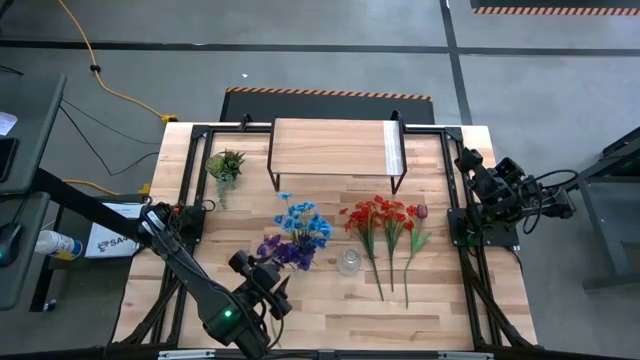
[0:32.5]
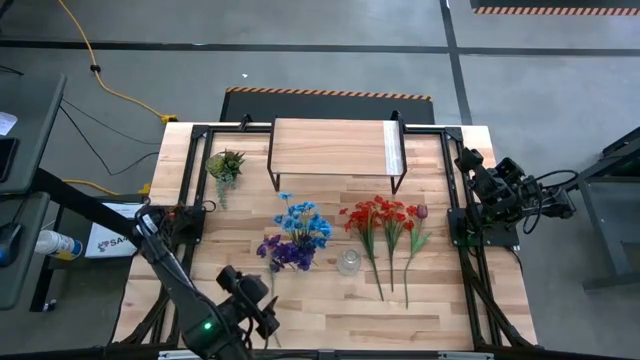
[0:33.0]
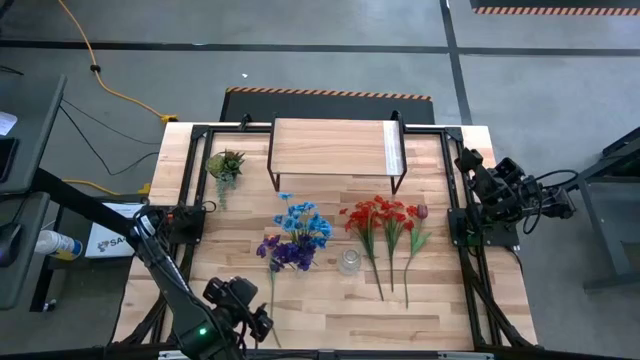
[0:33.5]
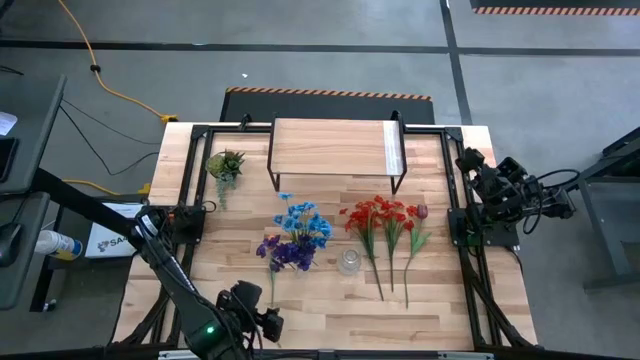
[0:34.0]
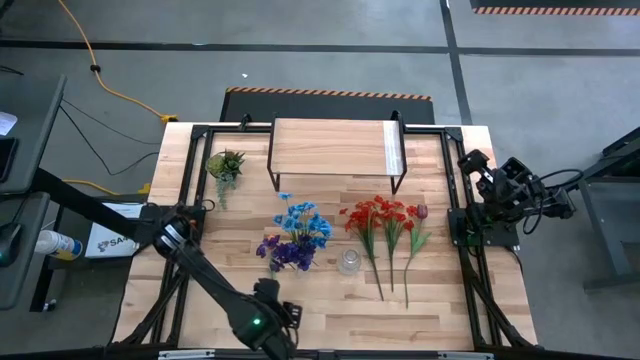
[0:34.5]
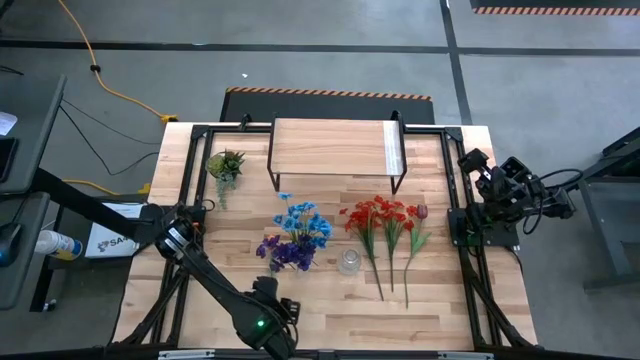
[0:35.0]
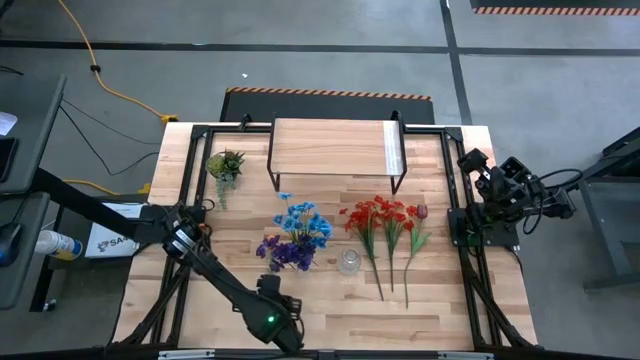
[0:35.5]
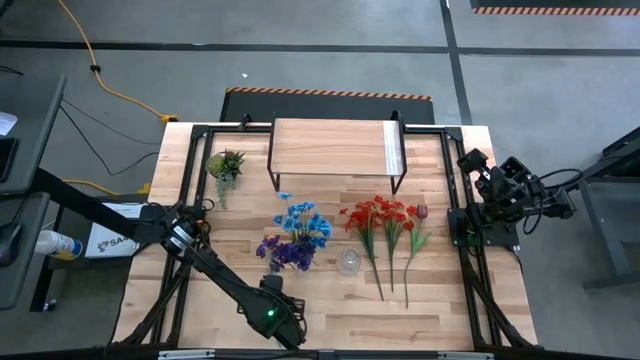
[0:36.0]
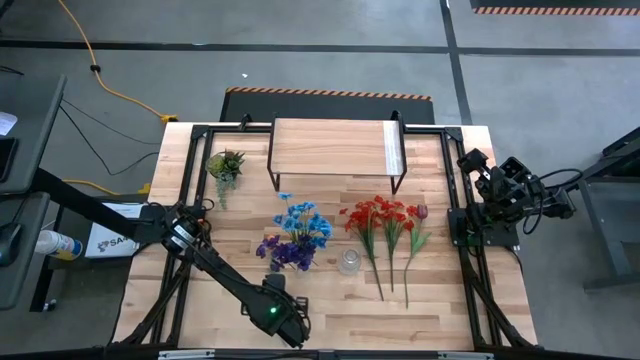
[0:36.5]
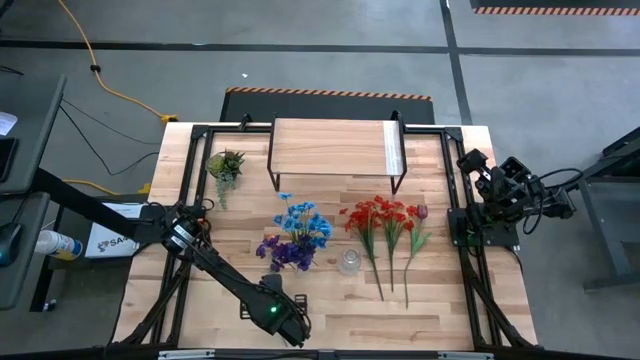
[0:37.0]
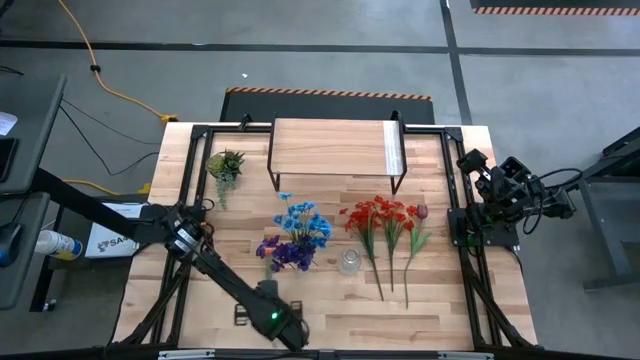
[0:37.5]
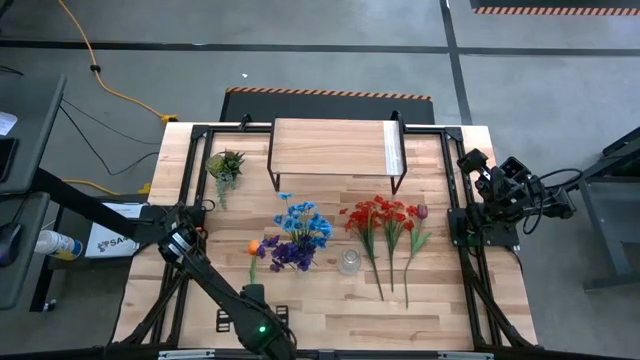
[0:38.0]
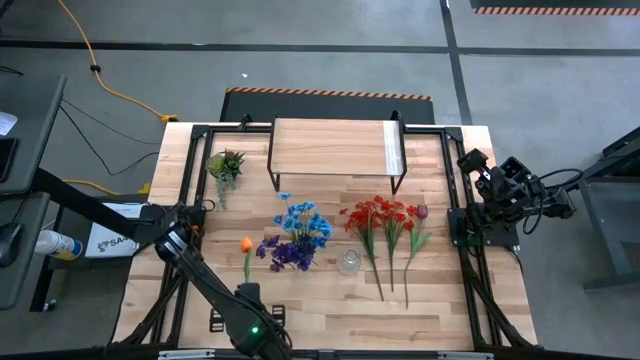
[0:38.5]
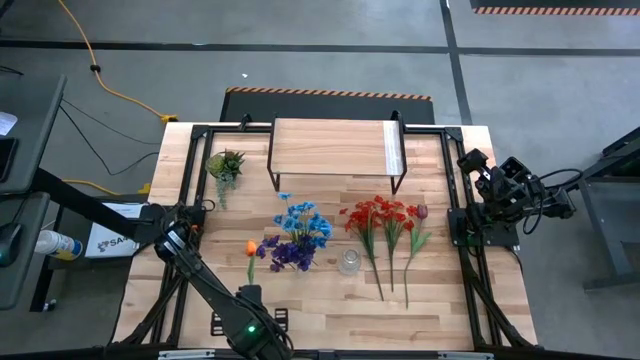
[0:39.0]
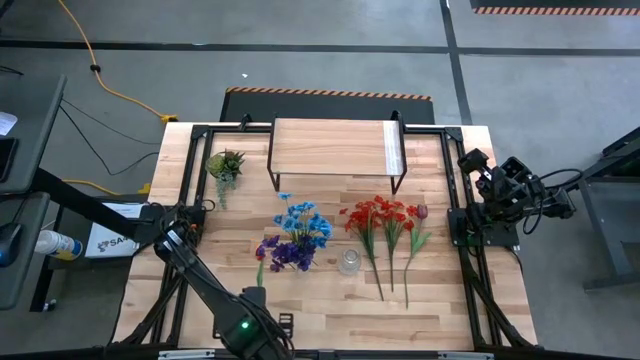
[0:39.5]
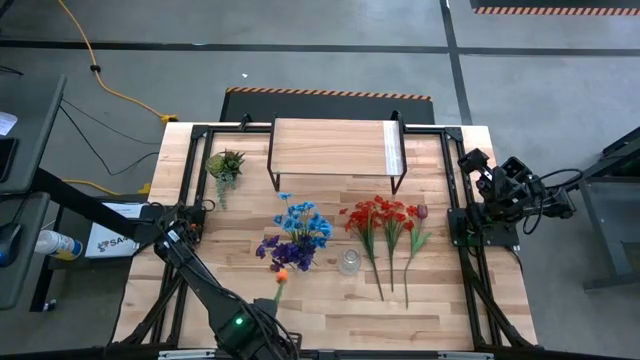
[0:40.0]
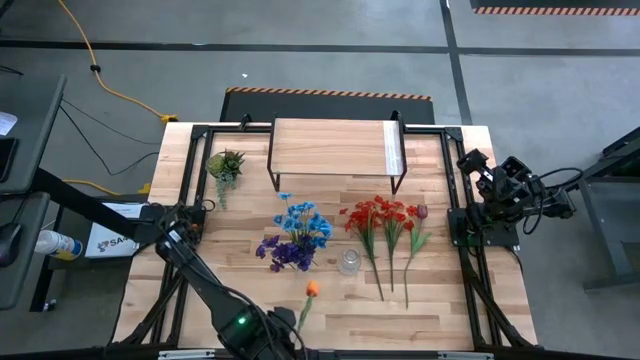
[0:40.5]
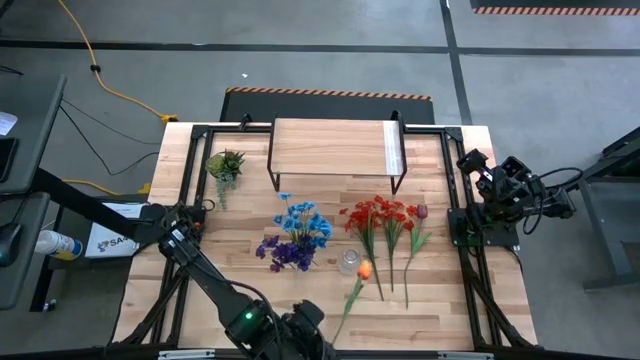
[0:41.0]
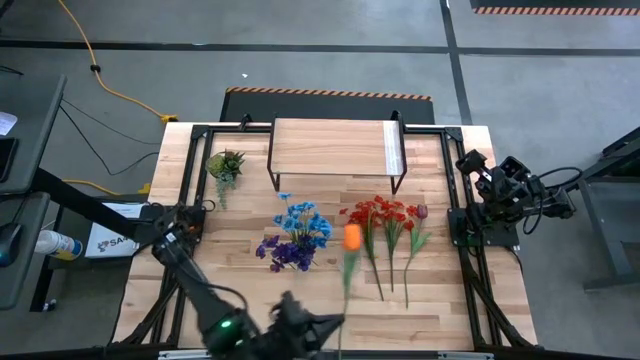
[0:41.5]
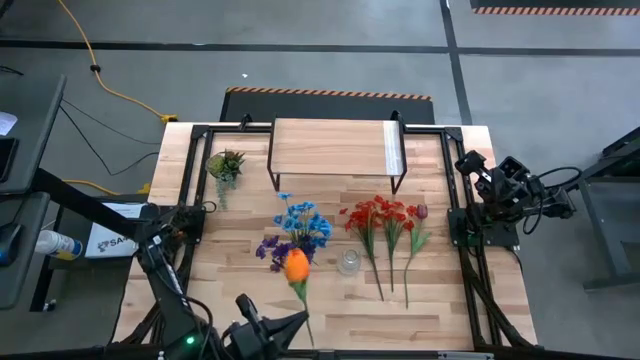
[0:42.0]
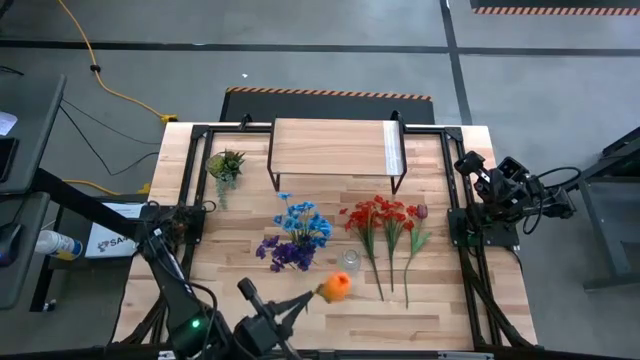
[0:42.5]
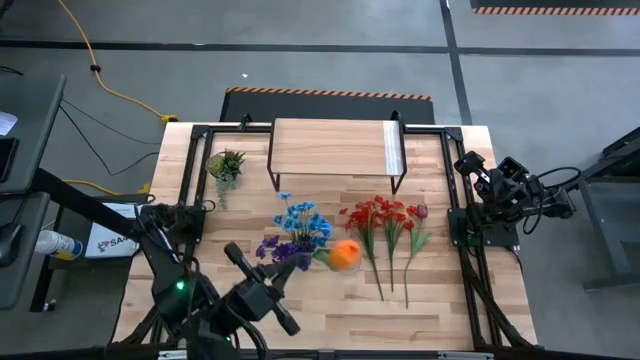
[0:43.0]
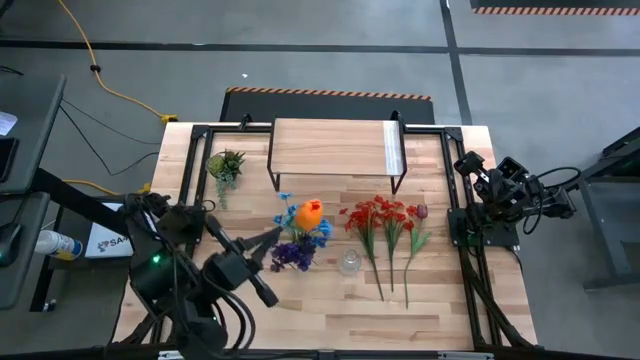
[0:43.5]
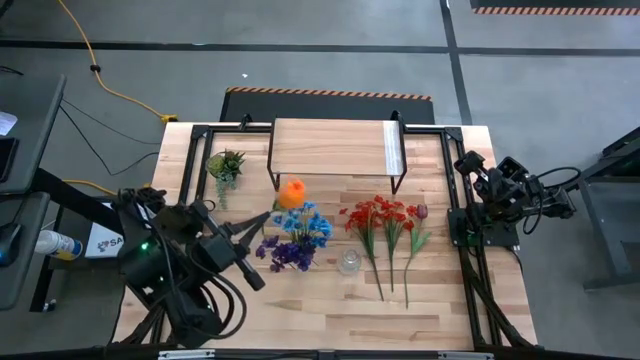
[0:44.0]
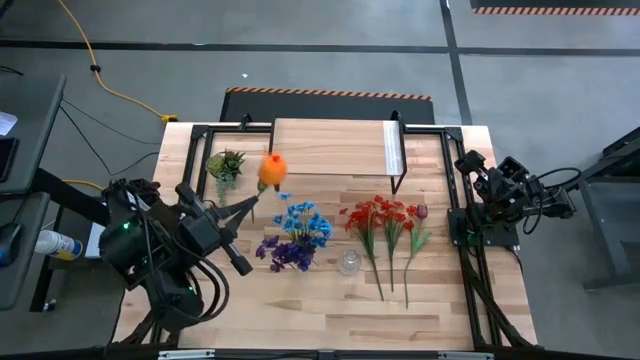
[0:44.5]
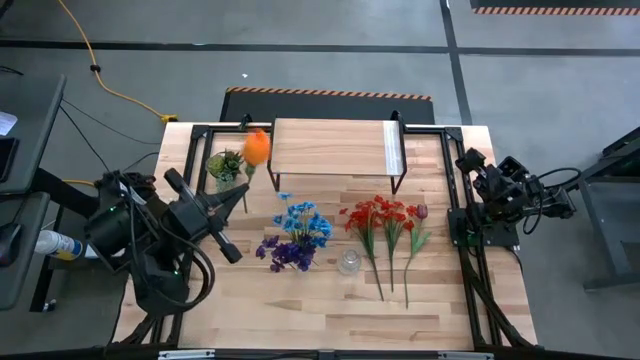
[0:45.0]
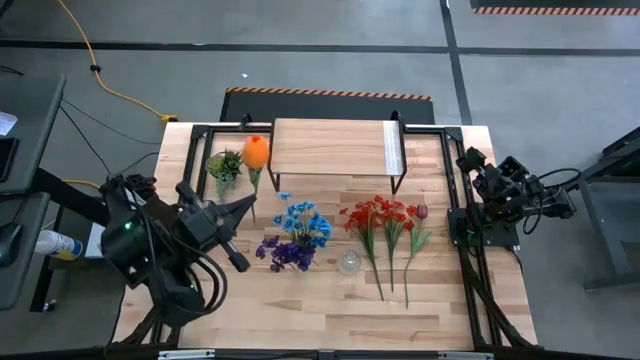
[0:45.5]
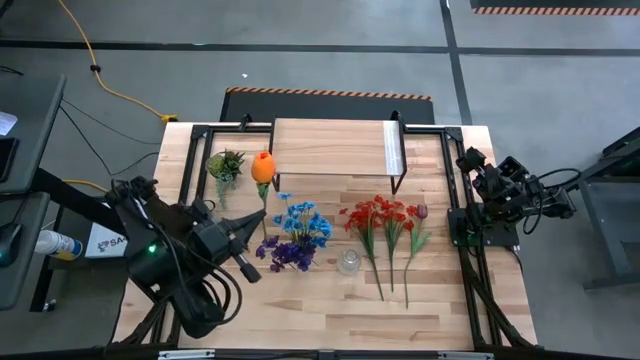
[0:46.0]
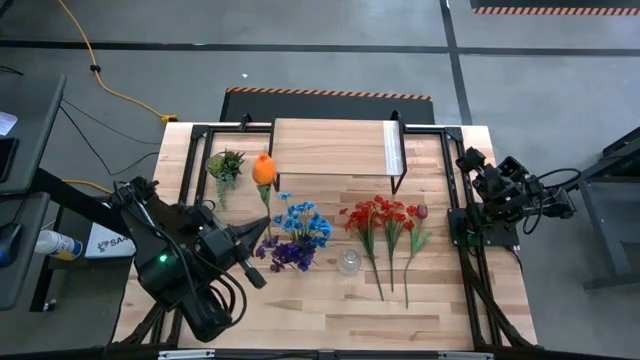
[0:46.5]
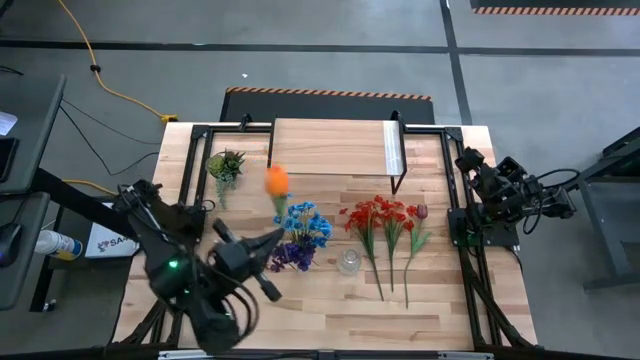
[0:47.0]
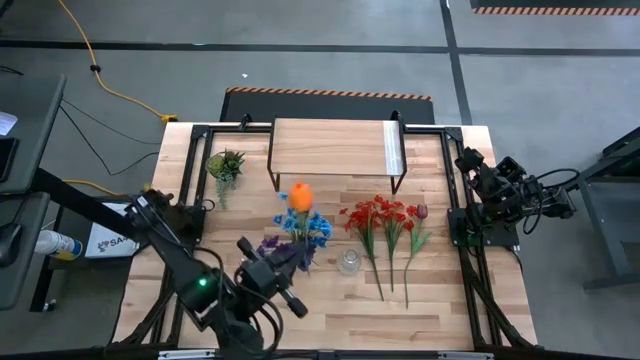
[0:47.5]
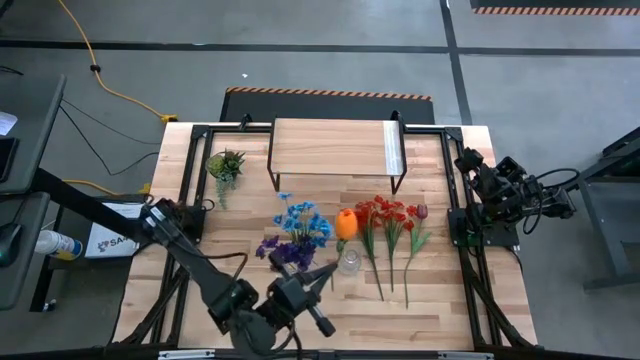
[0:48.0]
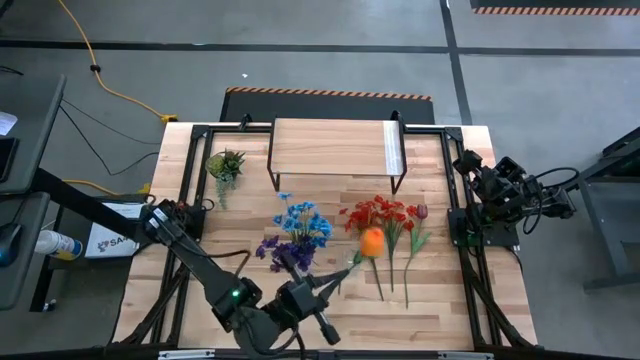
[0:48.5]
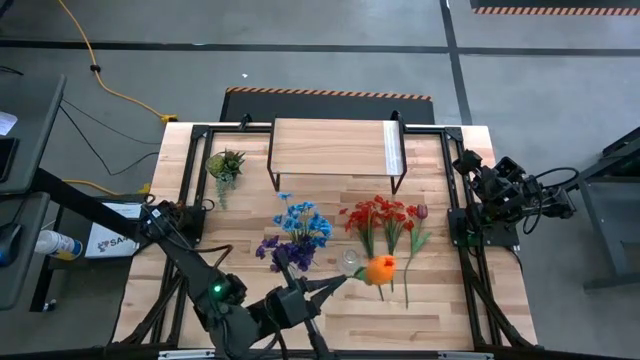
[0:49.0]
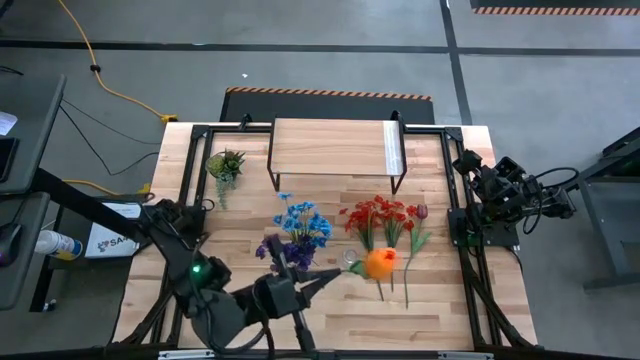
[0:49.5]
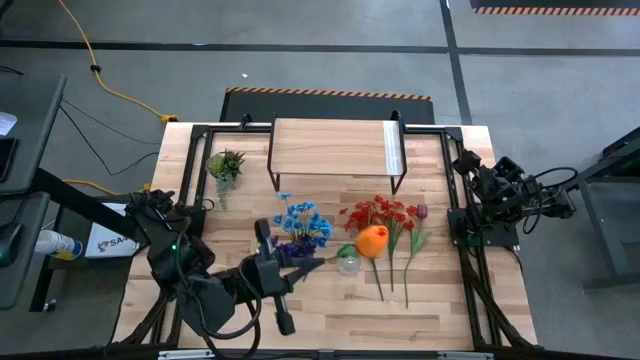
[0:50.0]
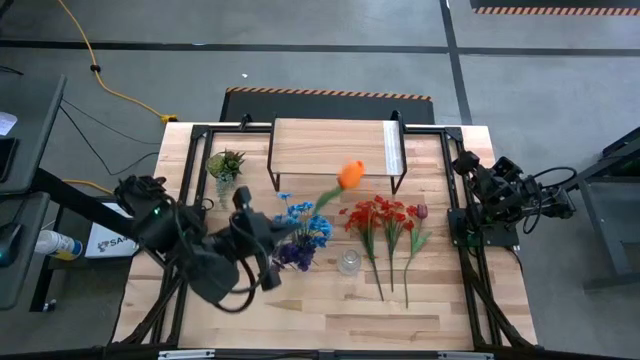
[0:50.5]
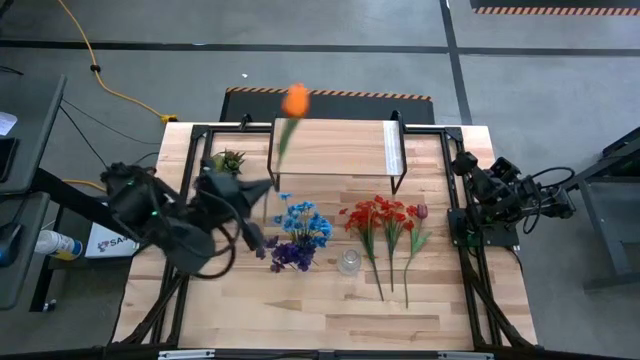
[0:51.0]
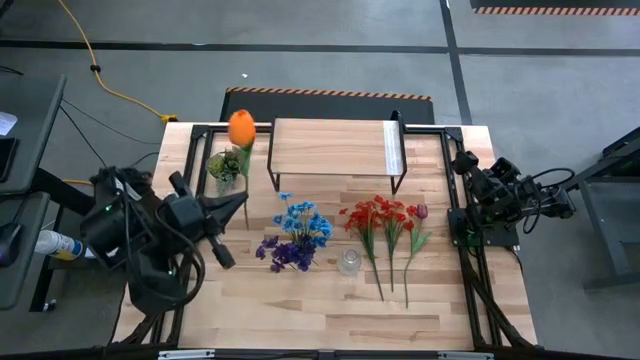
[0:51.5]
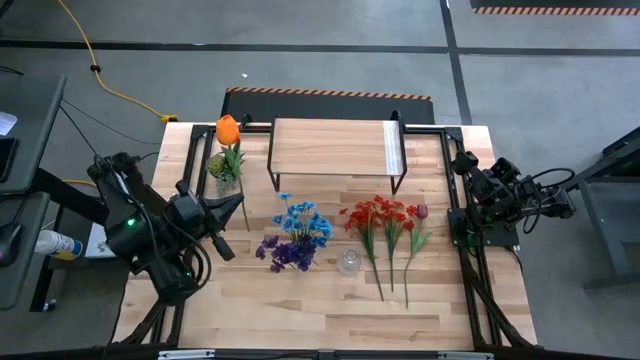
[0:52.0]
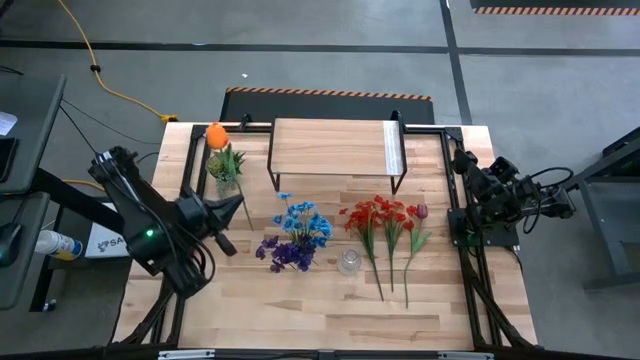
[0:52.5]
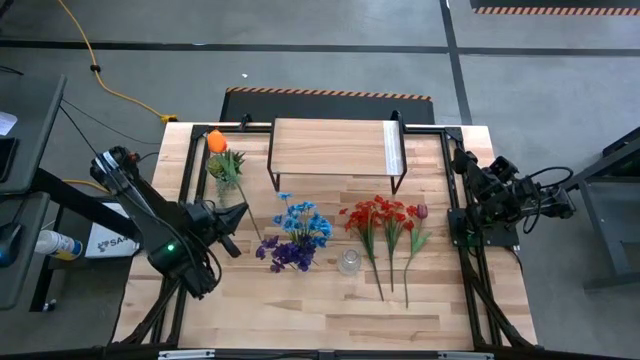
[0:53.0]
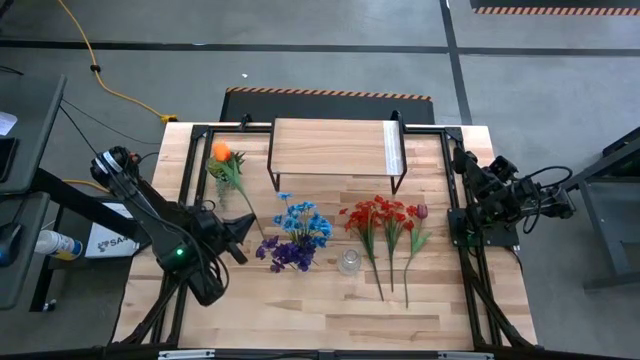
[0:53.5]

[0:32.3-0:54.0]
Task: Pick and place flowers into a vace then onto a shelf
Put the orange flower into the left transparent flower vase
